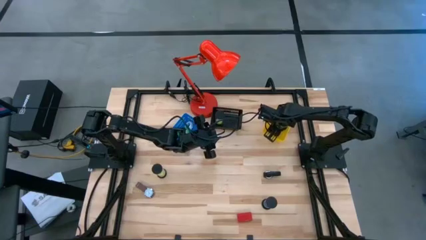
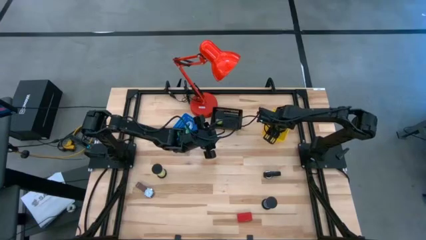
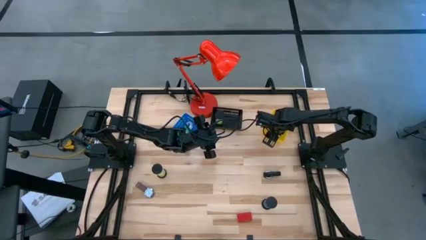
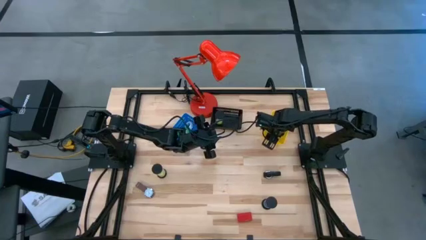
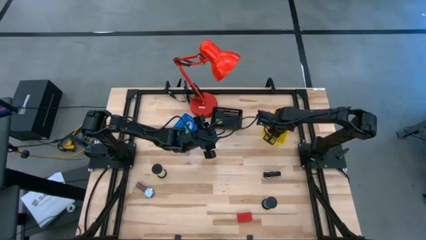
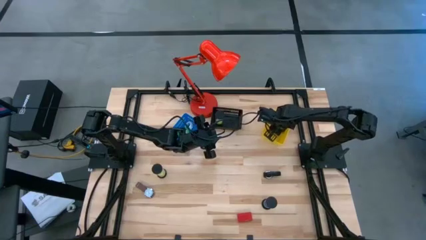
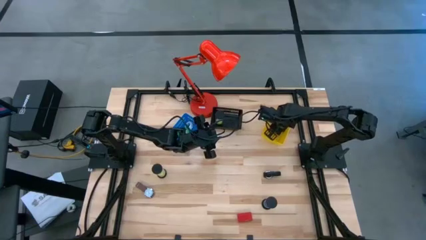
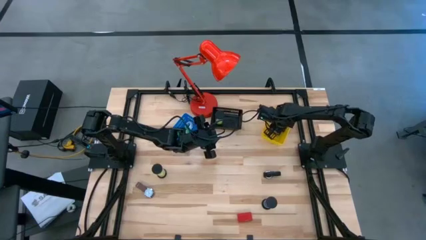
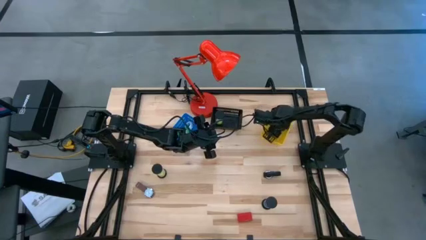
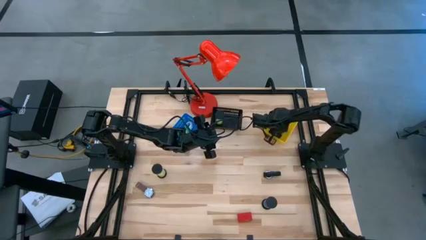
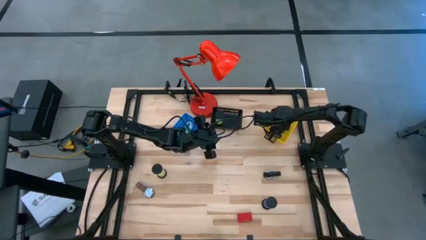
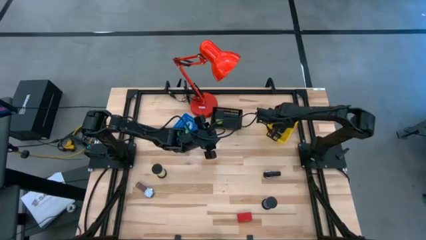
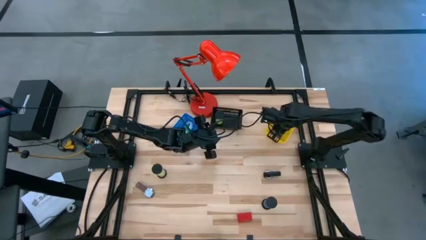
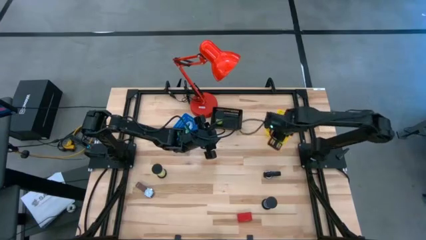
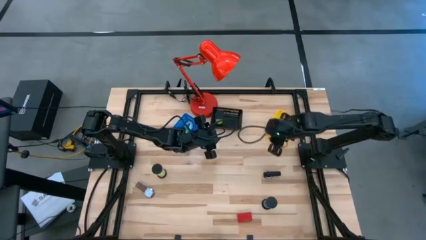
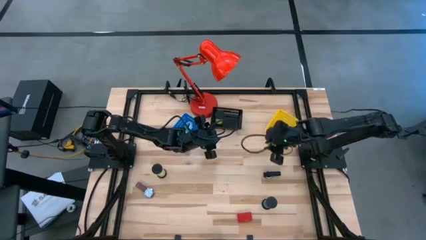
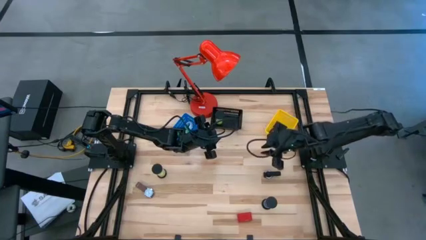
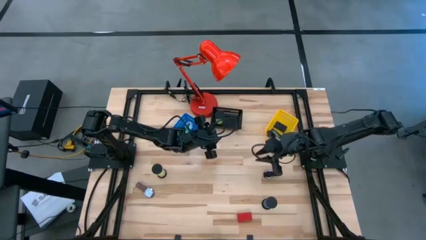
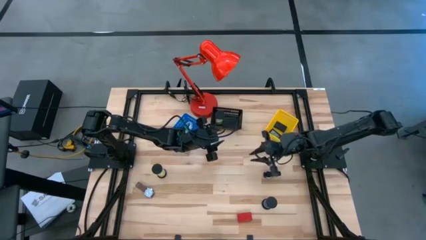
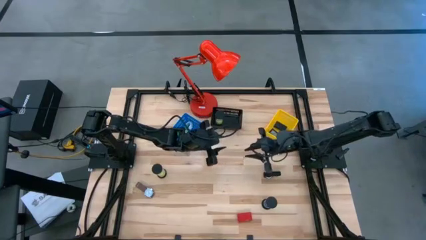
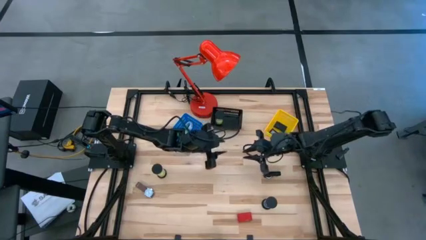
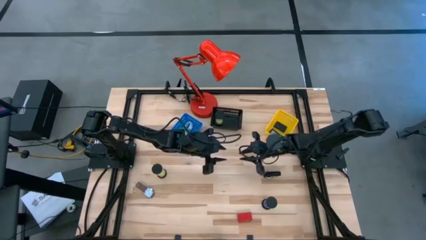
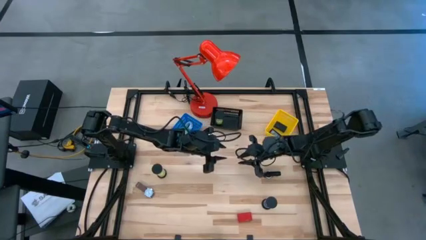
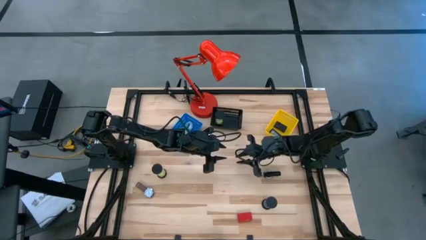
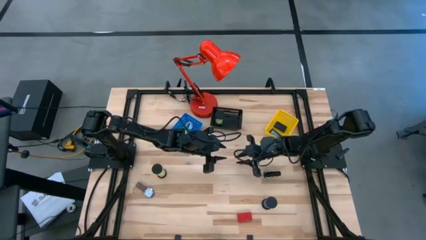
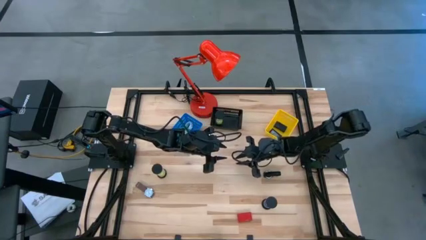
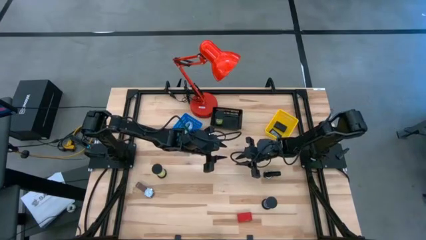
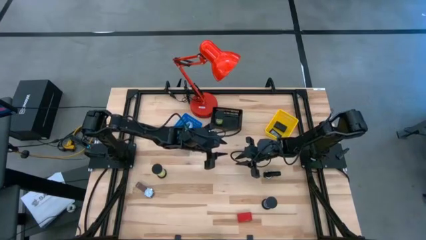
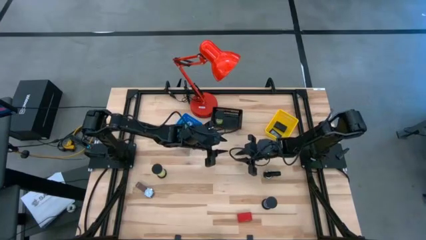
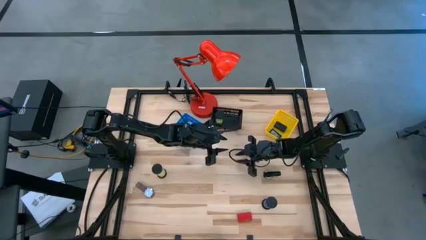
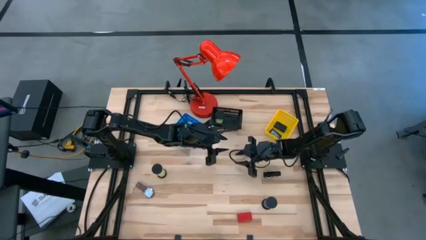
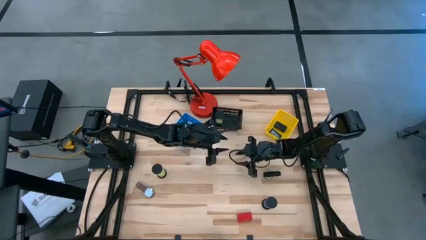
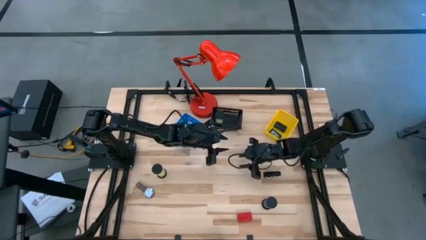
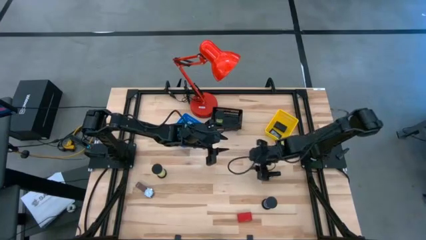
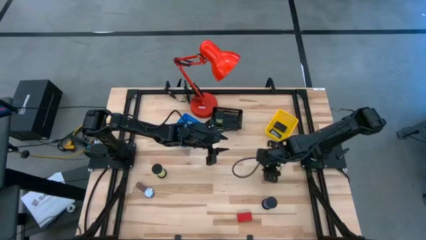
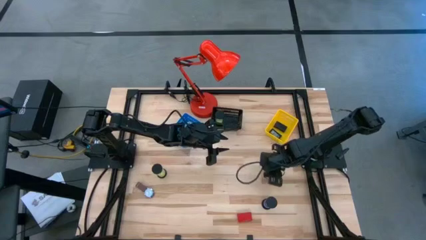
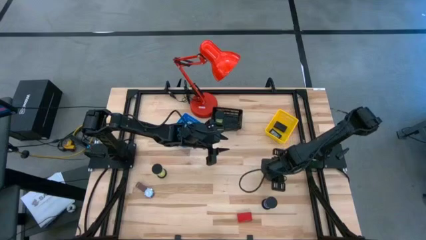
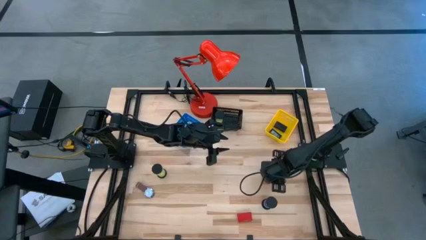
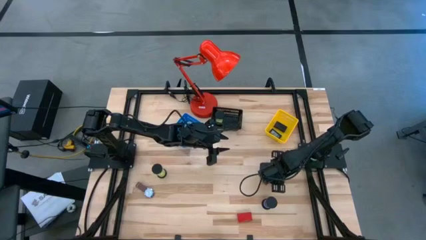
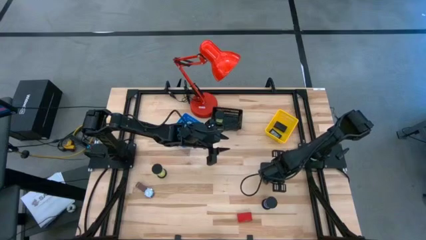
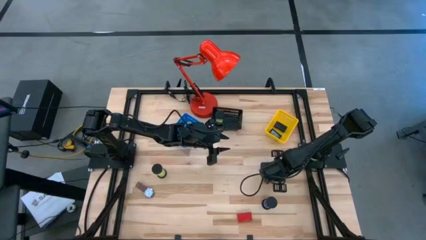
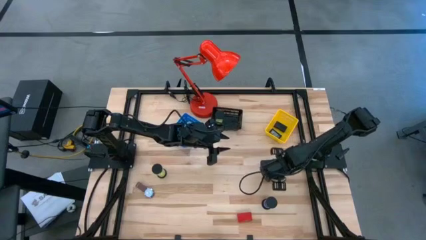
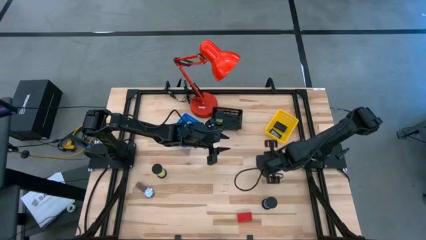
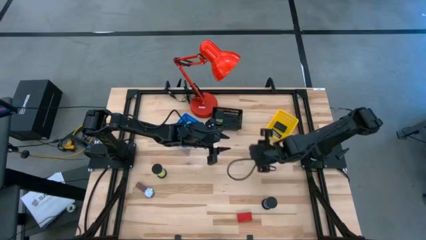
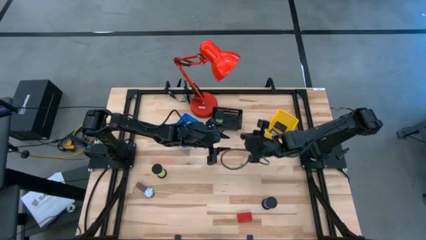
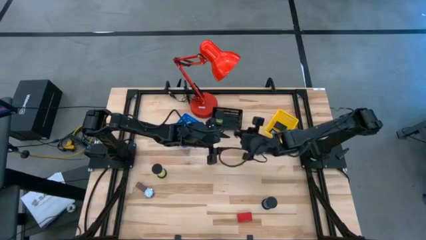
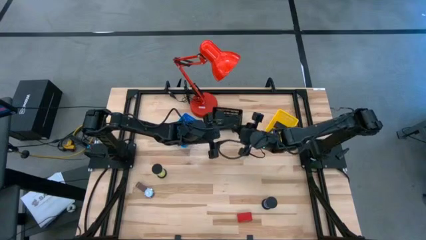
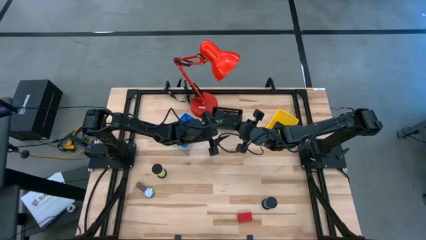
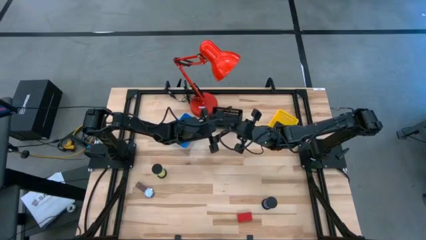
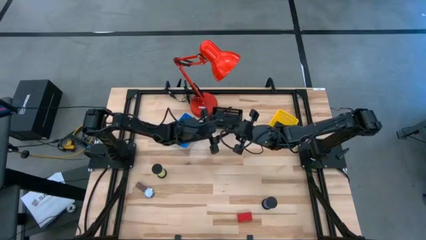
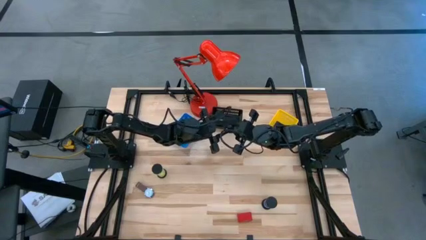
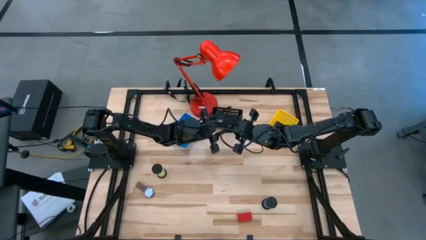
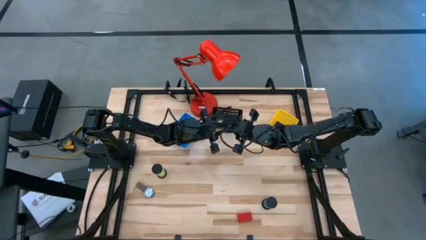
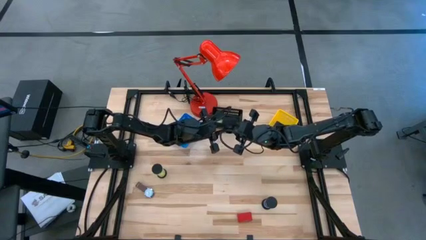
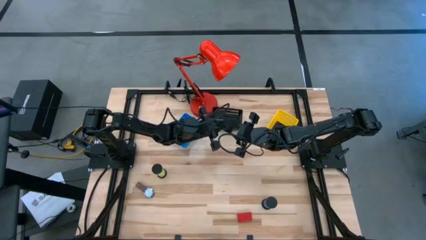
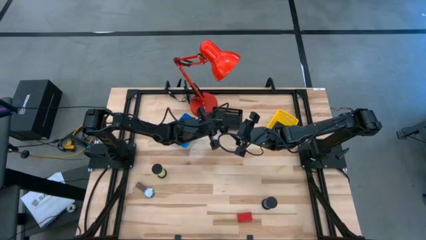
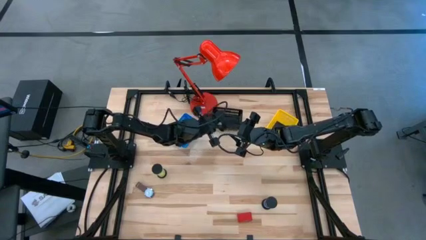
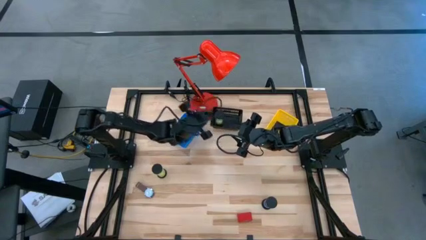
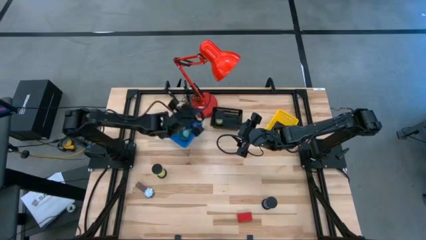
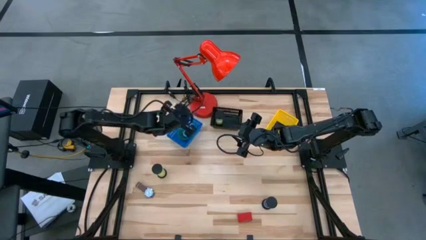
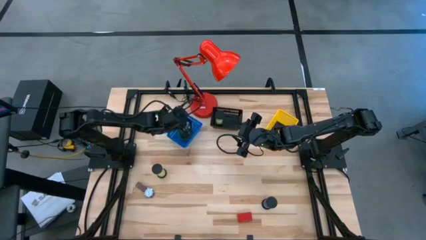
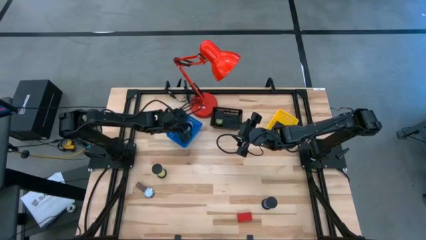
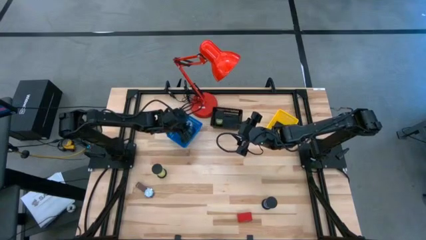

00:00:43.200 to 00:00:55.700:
Task: Pick & Place Office items
Put the black watch into the blue bin
